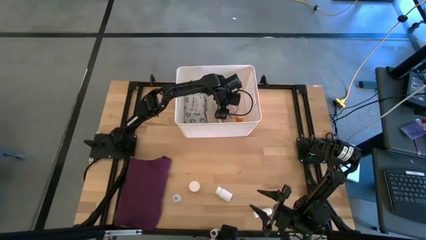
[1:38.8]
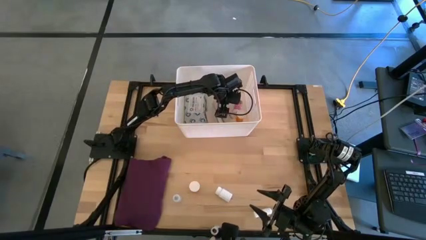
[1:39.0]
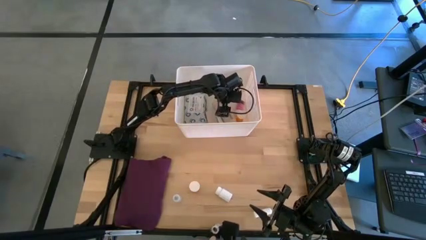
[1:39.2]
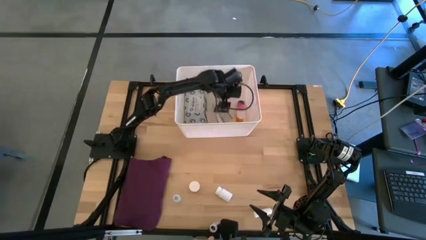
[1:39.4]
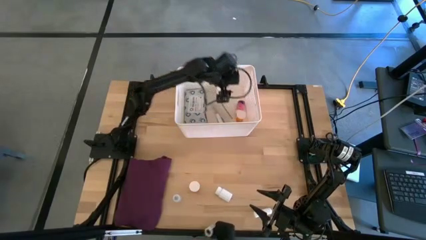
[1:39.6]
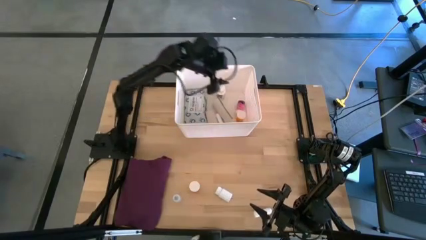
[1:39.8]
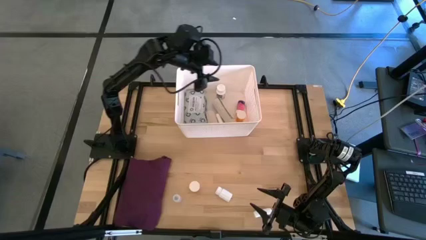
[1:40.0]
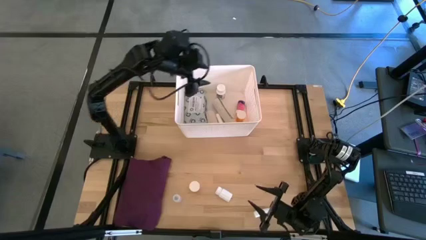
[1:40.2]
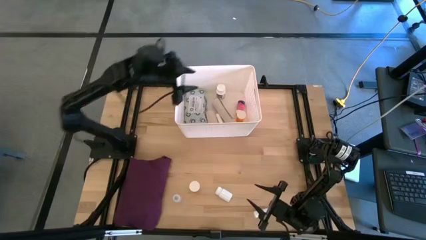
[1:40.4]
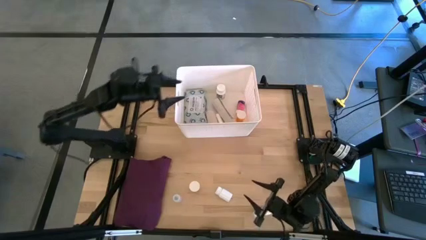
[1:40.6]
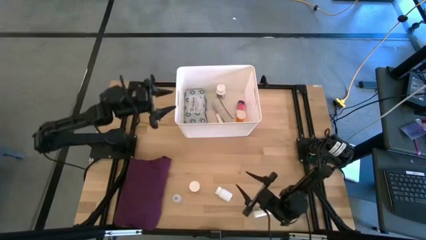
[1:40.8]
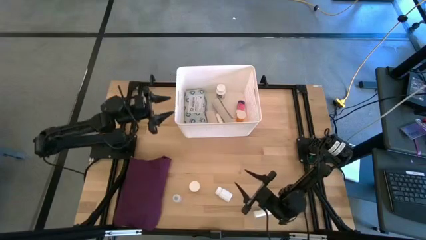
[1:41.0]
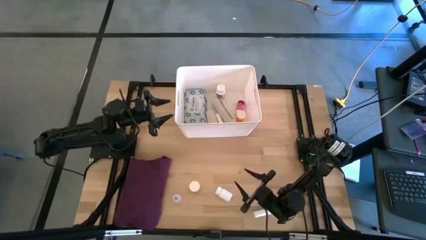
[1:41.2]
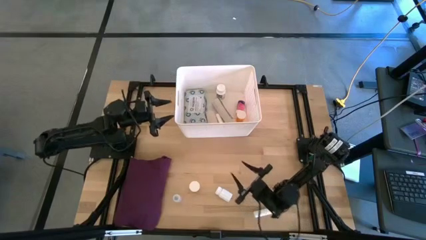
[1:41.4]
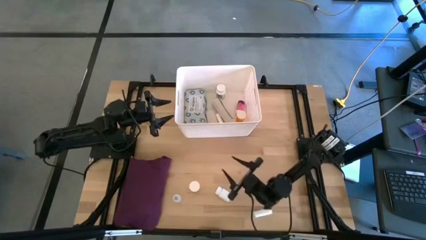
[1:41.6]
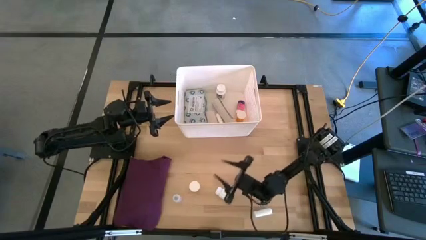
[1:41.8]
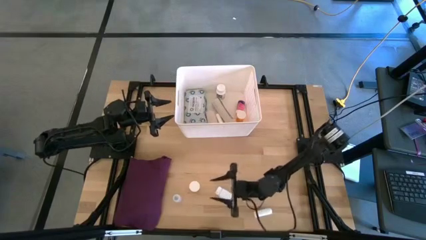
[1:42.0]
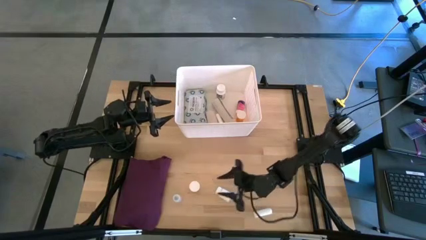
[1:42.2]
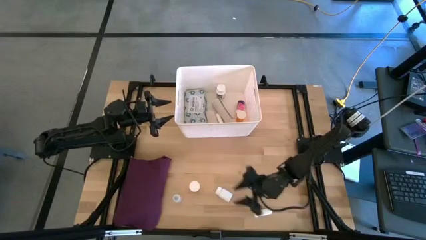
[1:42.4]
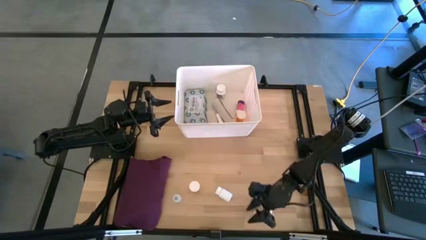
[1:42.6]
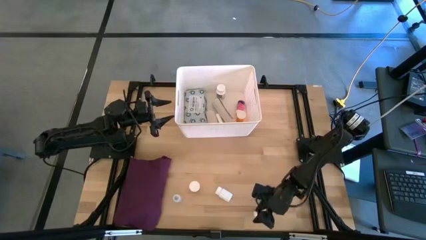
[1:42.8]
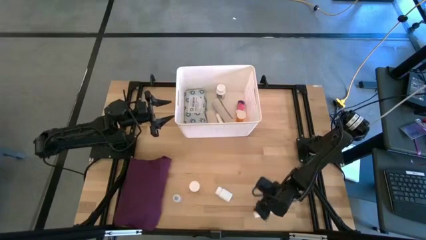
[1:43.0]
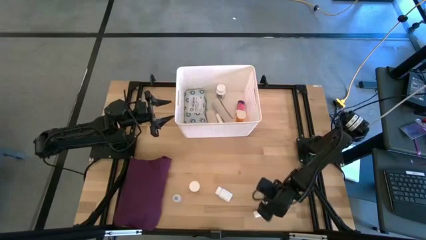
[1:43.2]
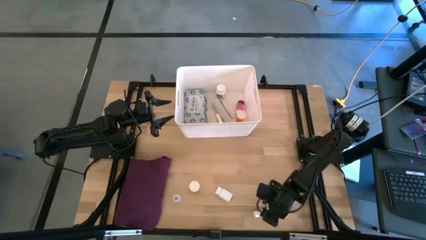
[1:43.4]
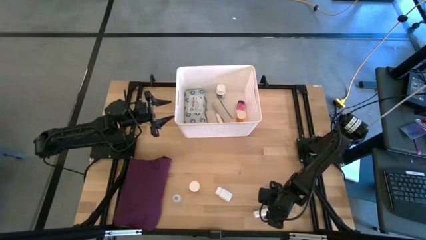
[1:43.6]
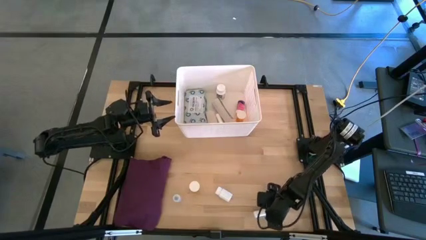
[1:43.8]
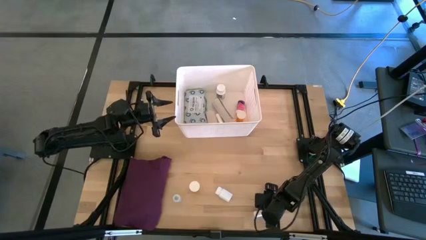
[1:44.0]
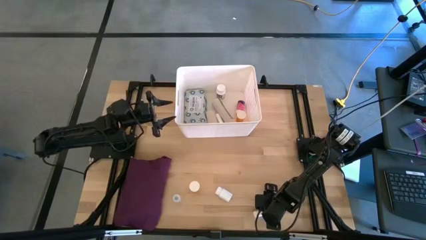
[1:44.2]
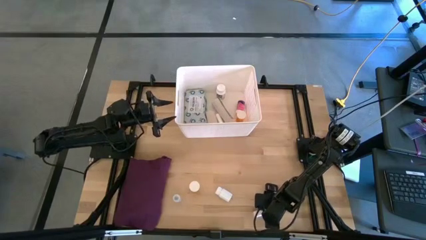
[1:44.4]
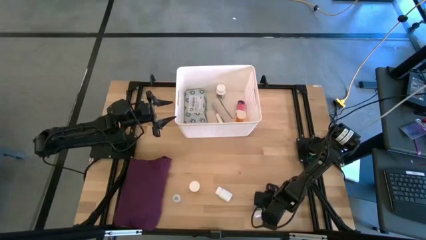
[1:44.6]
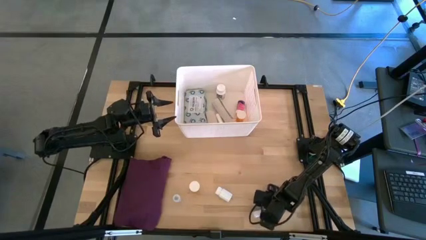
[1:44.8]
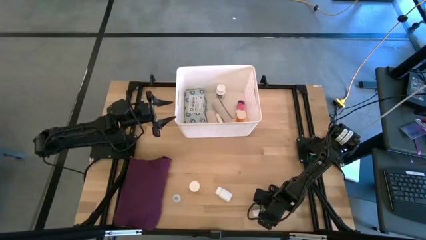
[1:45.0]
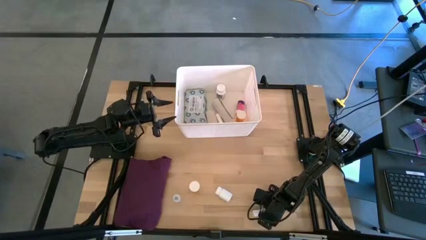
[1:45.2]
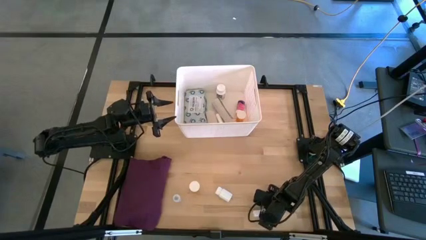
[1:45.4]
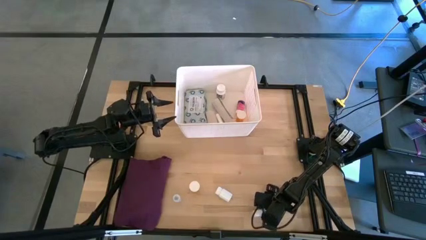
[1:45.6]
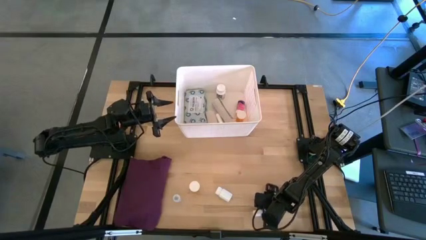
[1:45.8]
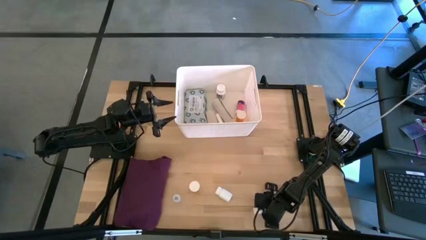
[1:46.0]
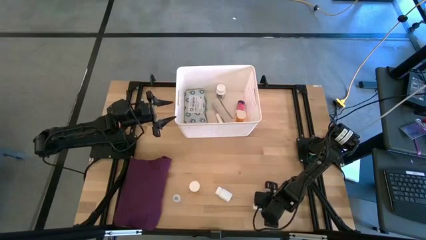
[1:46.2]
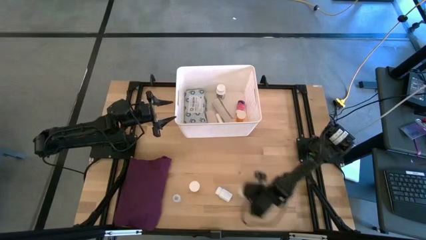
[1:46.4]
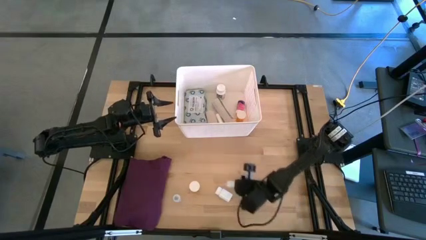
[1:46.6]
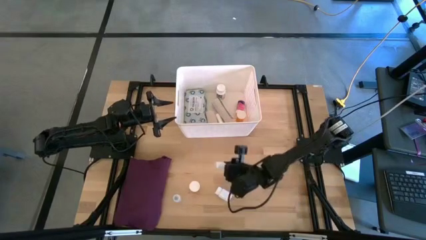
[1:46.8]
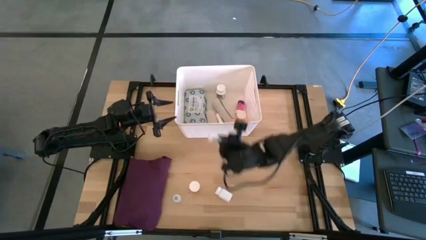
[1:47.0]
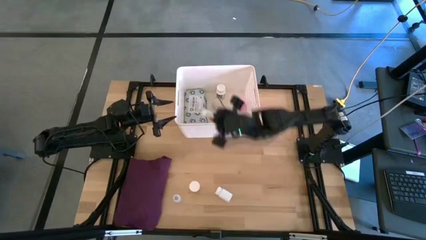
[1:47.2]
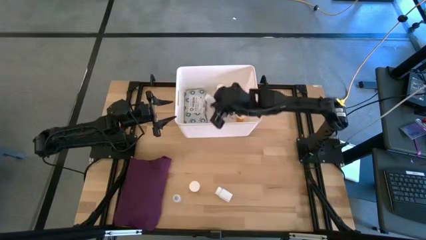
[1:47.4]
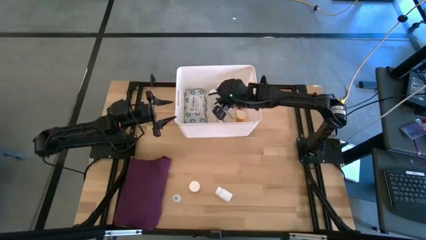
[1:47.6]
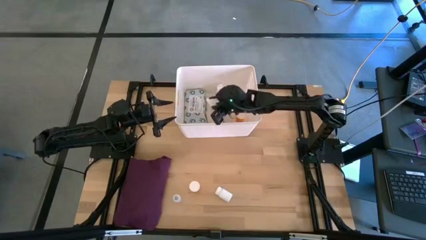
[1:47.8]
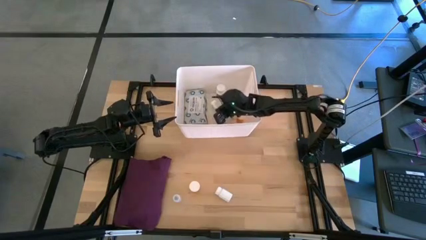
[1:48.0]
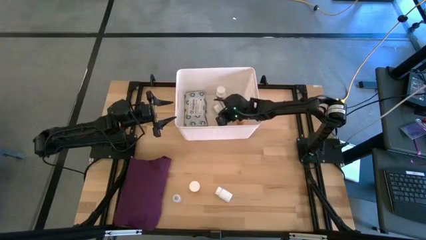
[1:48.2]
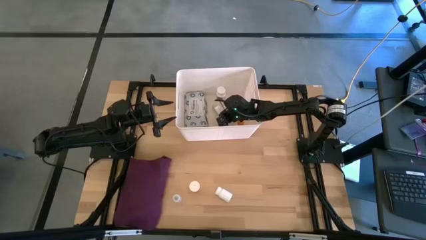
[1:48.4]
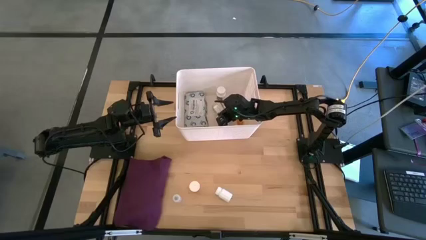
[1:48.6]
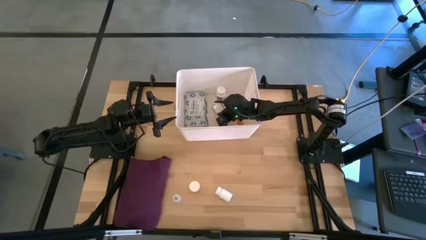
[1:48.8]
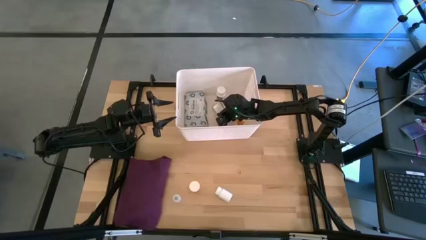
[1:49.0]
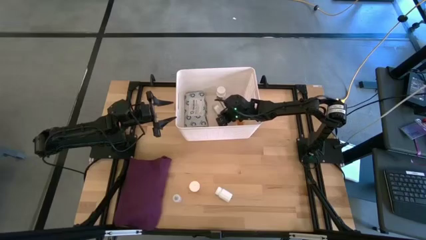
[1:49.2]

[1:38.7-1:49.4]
Task: Pick & place medical supplies in basket/bin
Put the white rolled gauze into the white bin

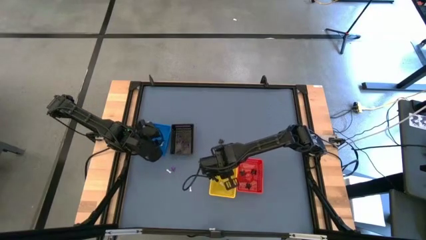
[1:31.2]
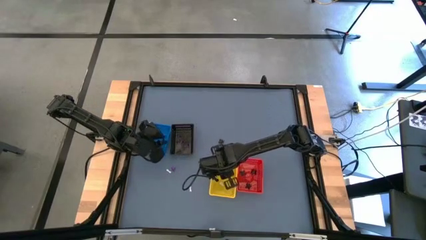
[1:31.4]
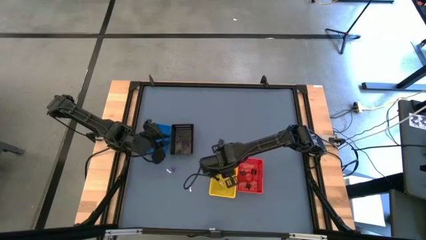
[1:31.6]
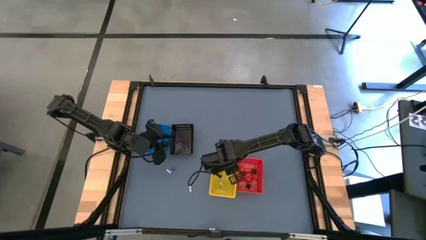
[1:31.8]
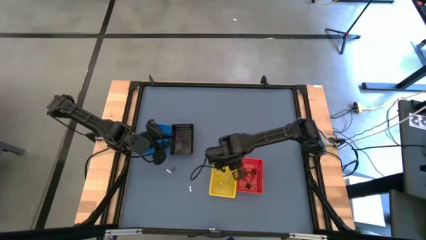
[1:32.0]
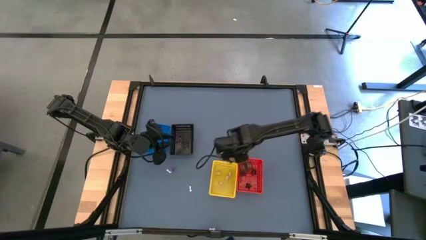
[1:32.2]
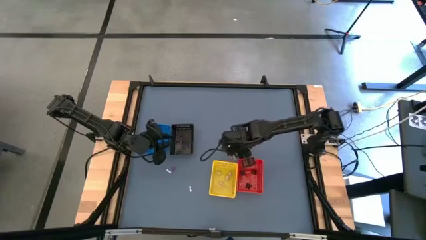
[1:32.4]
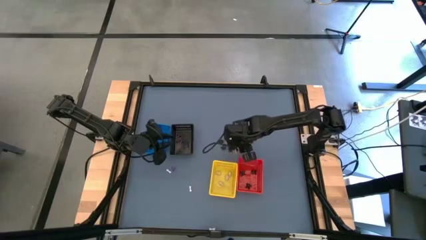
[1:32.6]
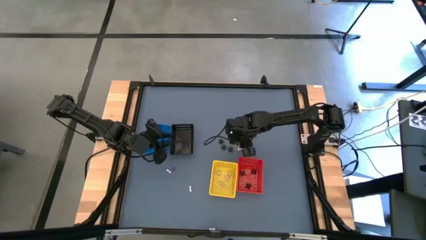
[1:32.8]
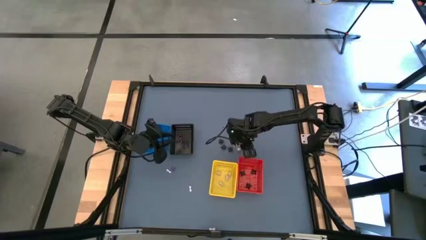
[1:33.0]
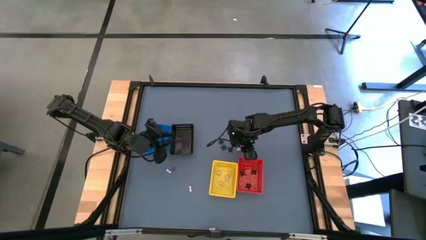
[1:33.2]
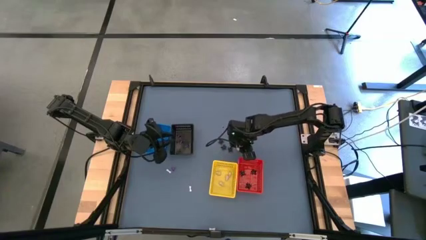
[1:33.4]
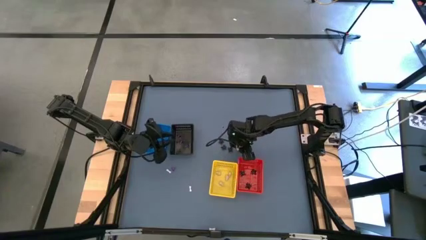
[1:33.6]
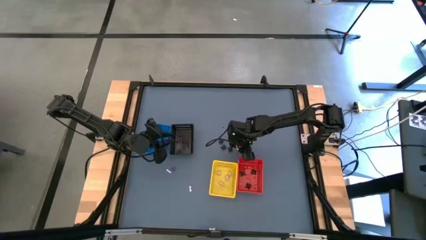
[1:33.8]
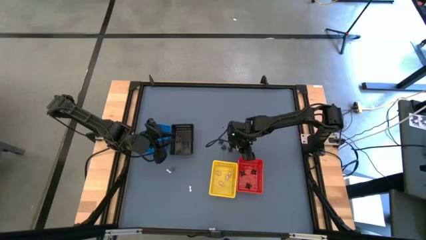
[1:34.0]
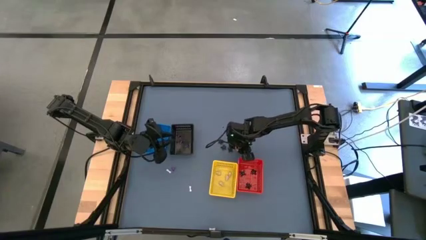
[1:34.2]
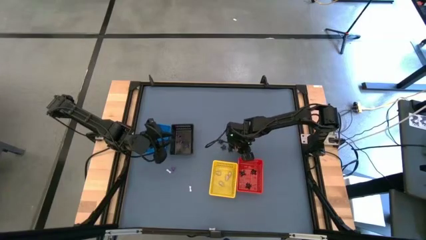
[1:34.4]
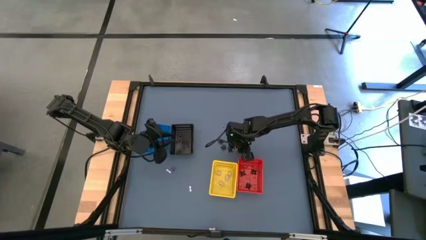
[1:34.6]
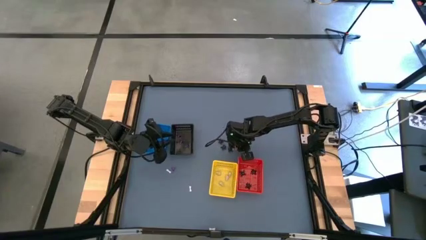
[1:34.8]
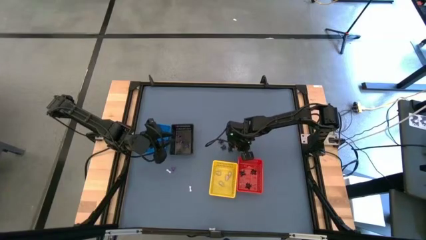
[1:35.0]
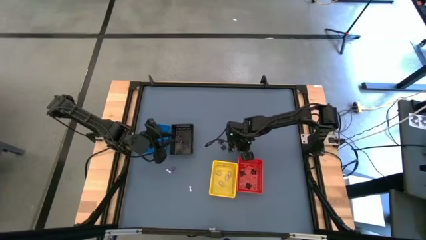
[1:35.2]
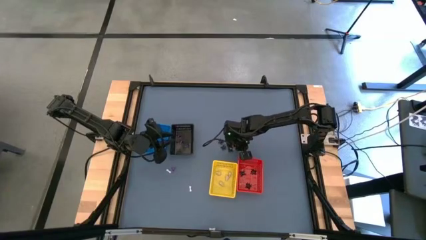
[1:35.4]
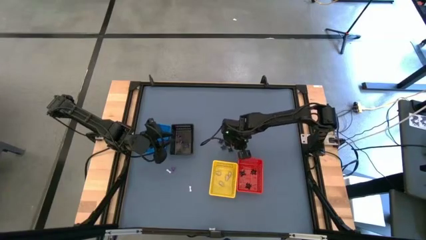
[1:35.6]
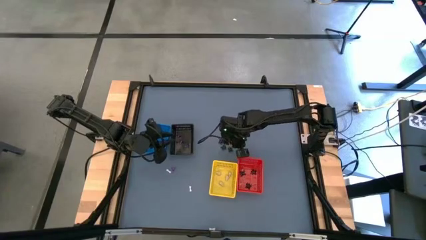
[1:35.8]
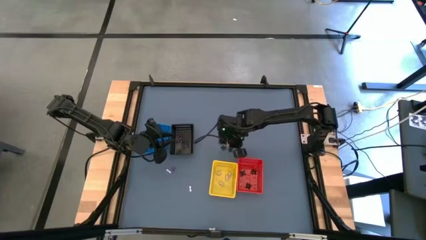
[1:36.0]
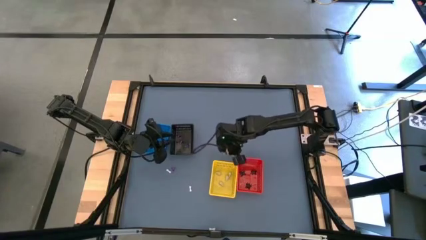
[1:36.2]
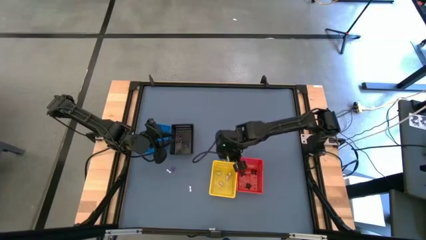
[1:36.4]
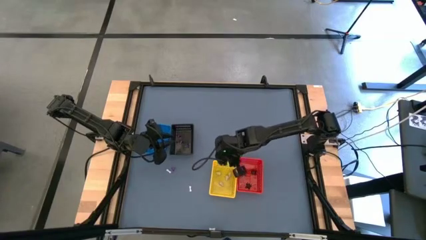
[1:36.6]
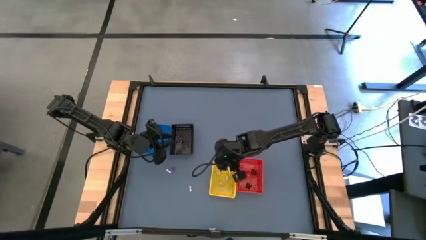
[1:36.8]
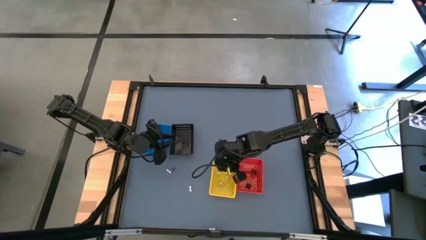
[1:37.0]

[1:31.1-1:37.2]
Task: Sort Halloween decoration
Put the skull into the yellow bin
